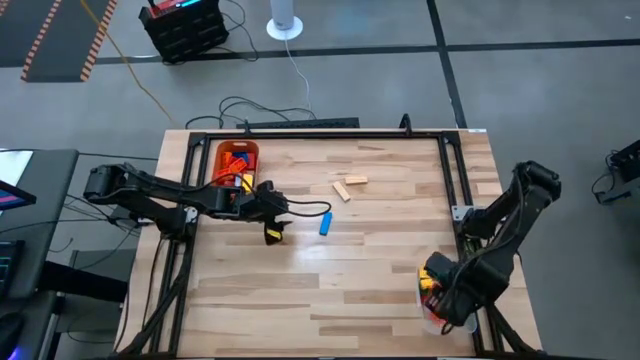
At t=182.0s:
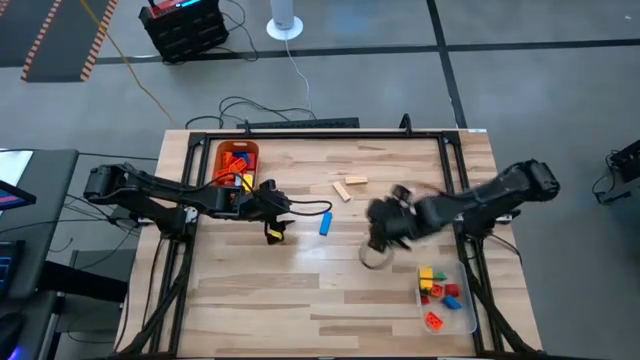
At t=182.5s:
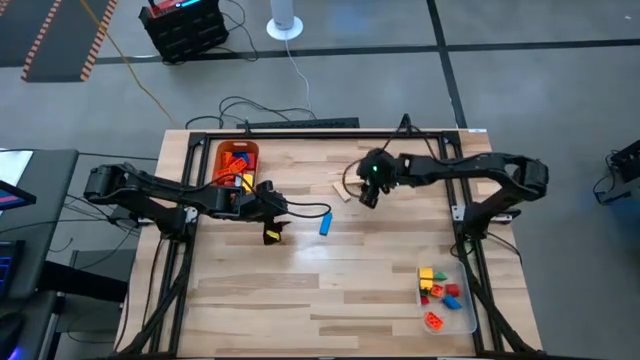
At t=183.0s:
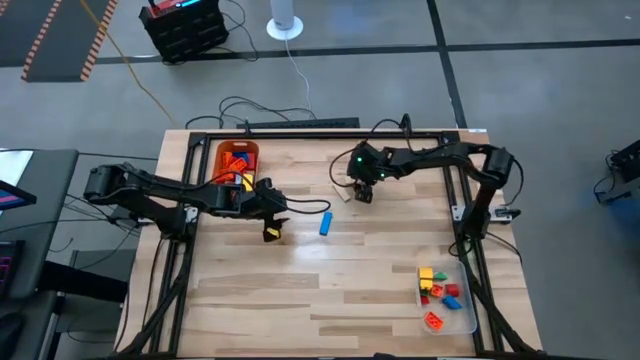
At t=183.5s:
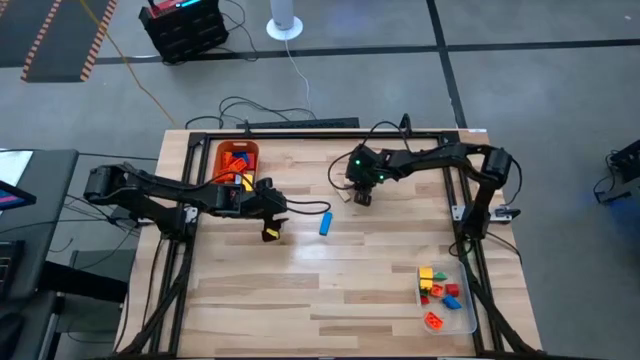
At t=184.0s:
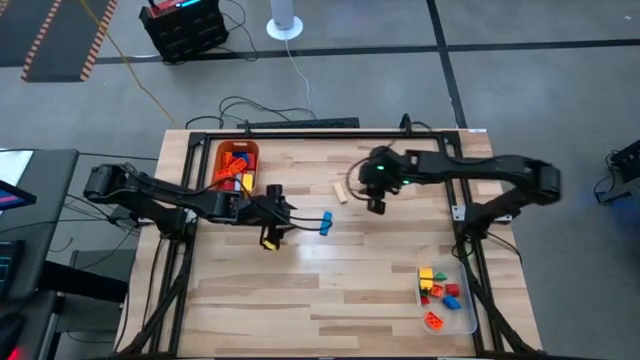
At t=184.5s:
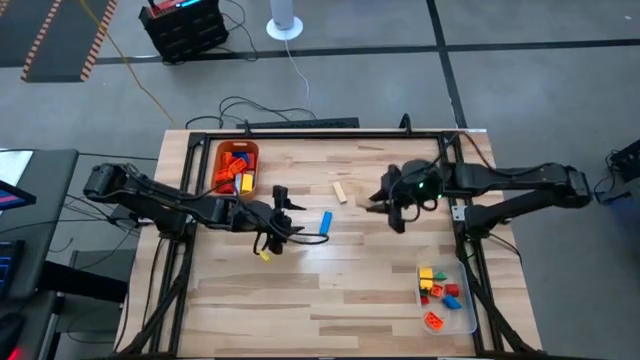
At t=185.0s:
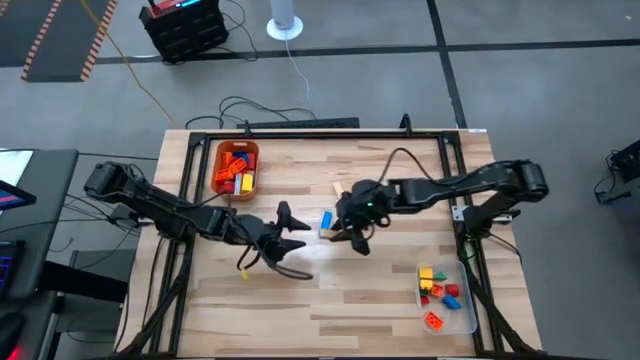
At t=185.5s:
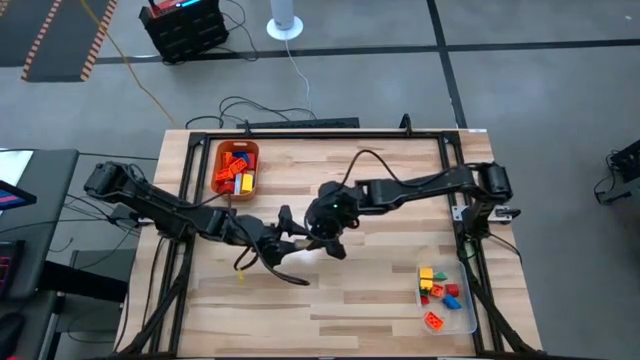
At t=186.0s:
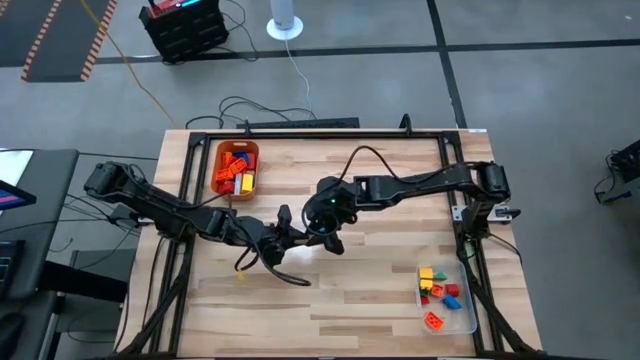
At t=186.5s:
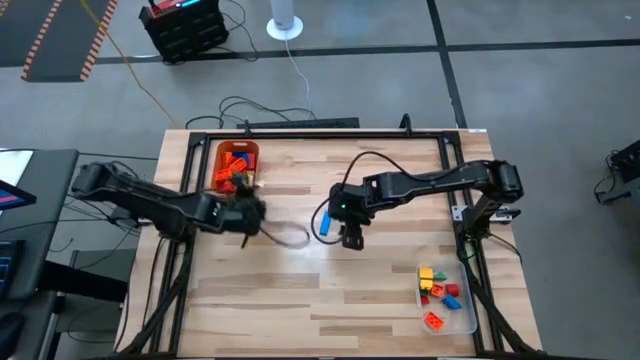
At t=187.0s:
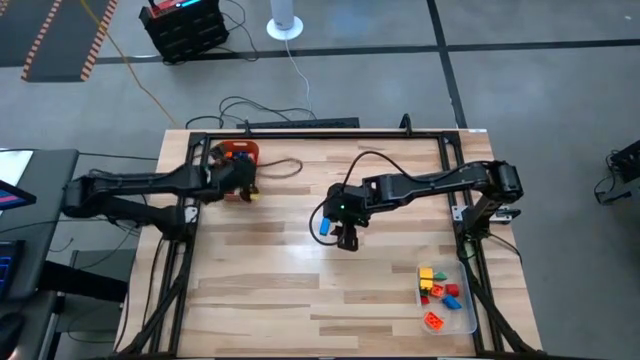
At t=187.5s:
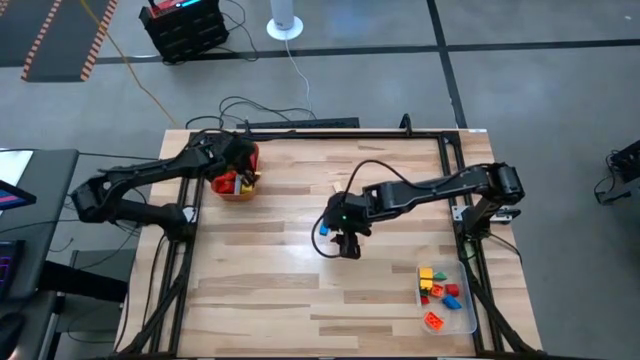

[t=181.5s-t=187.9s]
Task: Sort blocks by size
Put the large brown wooden block into the orange bin

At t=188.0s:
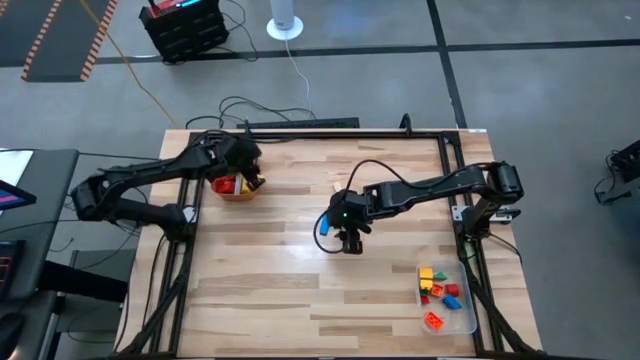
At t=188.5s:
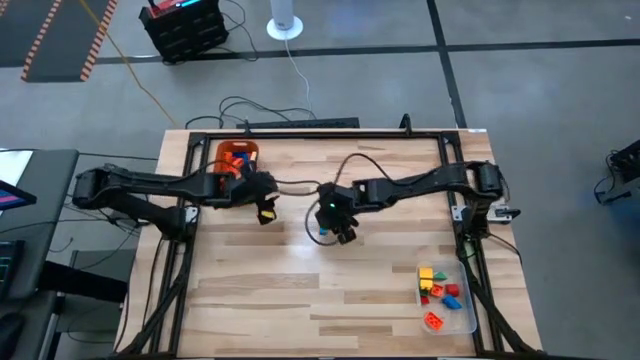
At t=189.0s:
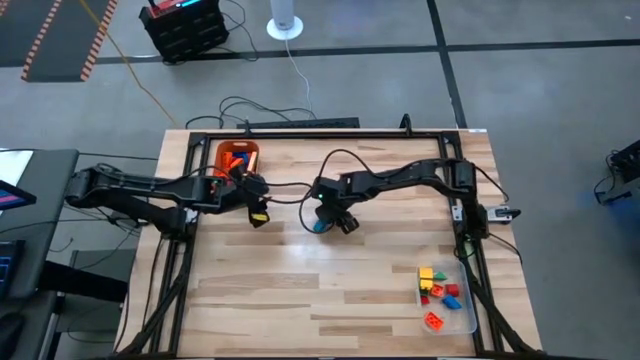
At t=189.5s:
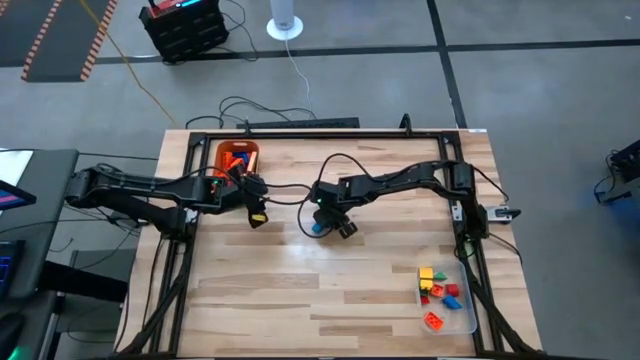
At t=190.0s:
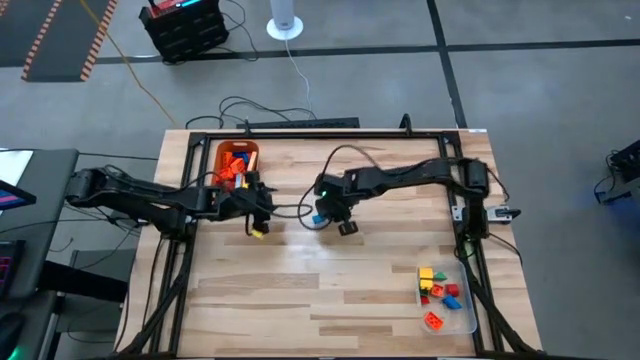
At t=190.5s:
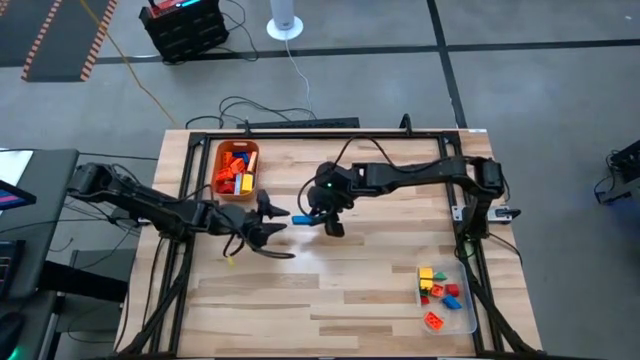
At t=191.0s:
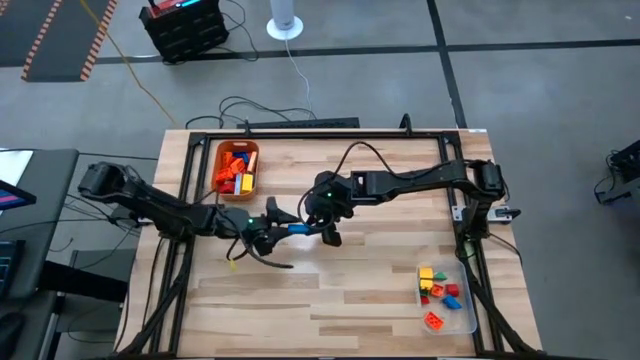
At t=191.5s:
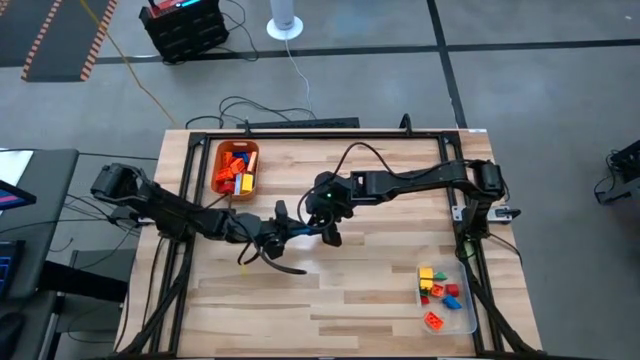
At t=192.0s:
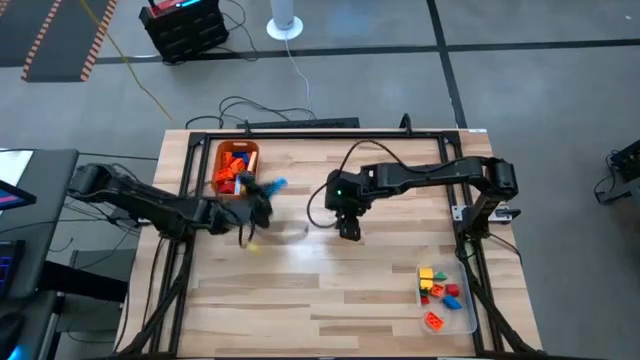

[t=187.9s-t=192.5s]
Put the large blue wooden block into the orange bin

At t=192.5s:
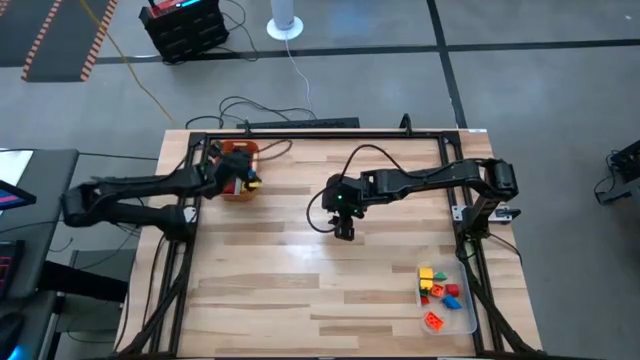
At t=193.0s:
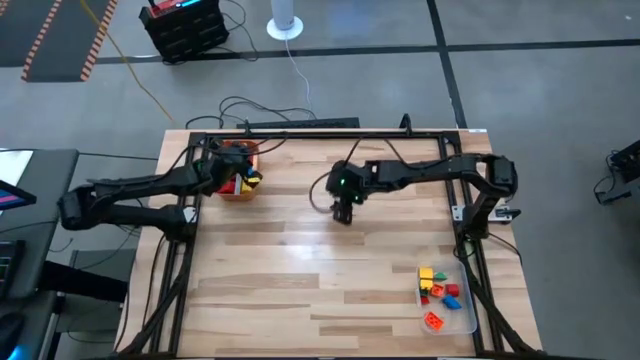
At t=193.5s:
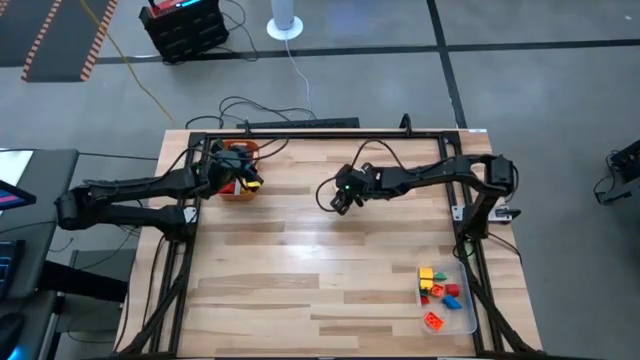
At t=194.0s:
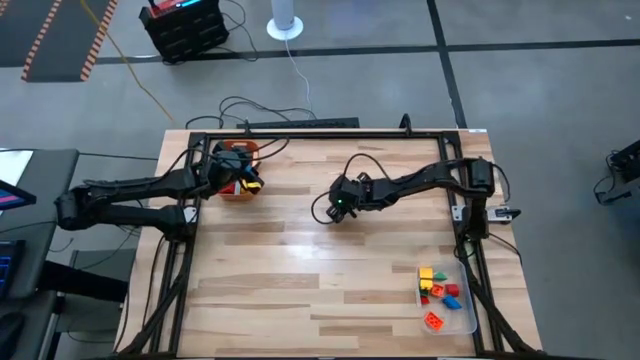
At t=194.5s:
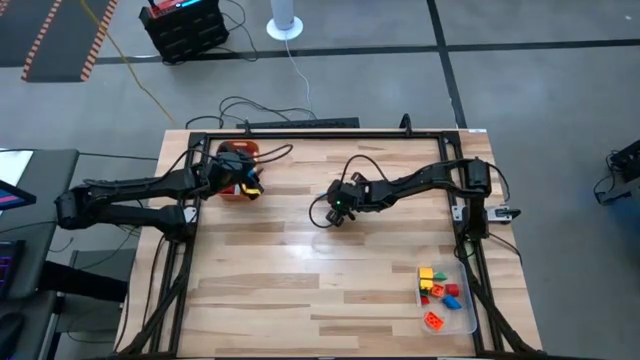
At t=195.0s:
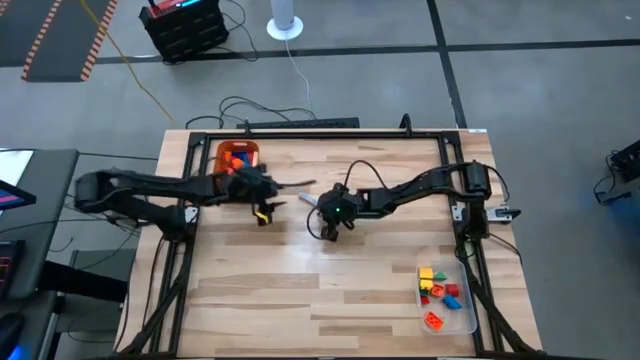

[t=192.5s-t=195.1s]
Put the large brown wooden block into the orange bin

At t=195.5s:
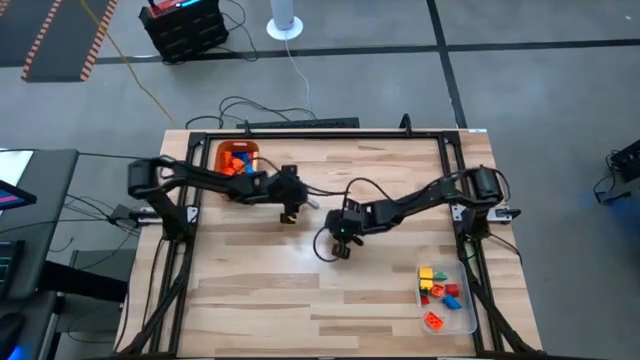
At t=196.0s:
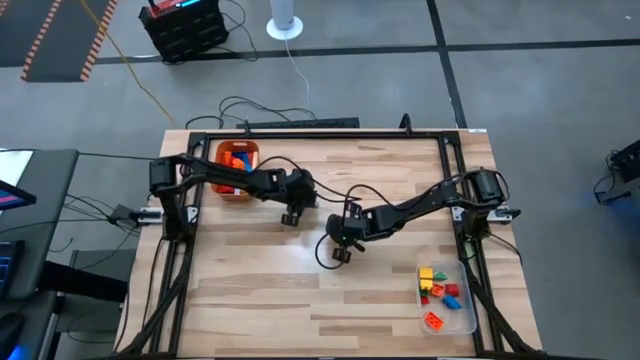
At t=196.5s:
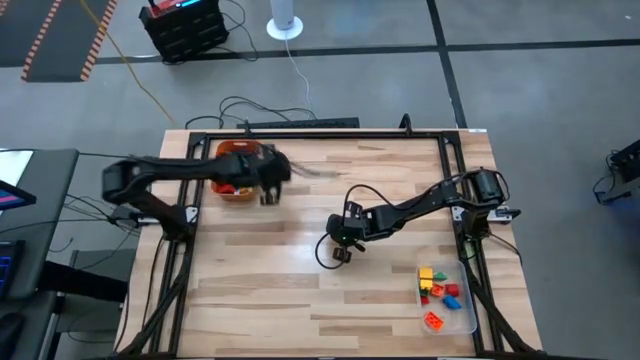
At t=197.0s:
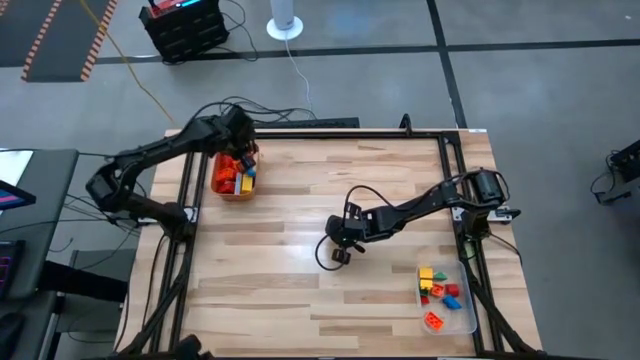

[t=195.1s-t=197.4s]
Put the large brown wooden block into the orange bin

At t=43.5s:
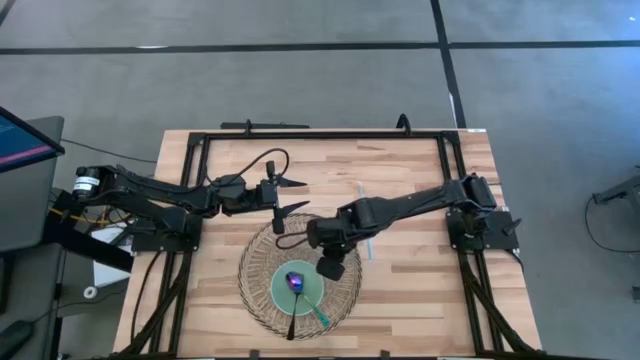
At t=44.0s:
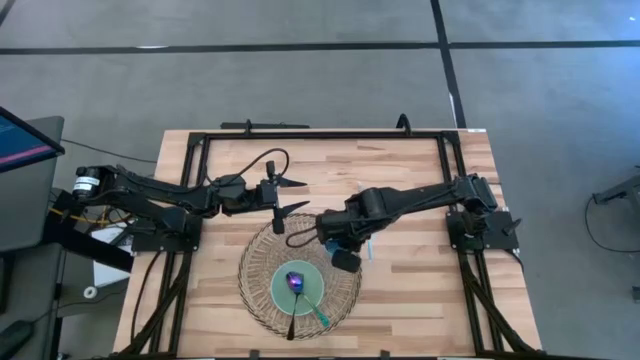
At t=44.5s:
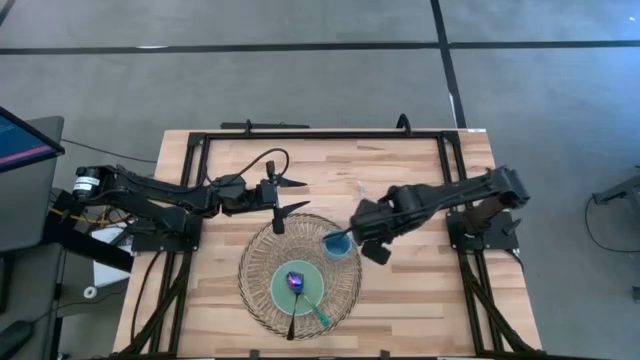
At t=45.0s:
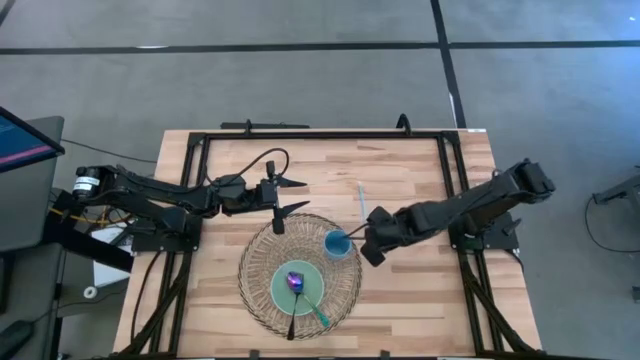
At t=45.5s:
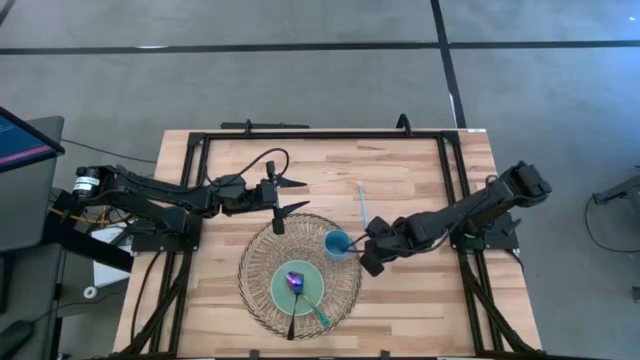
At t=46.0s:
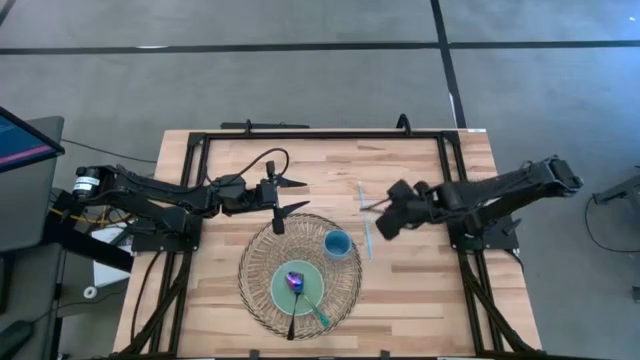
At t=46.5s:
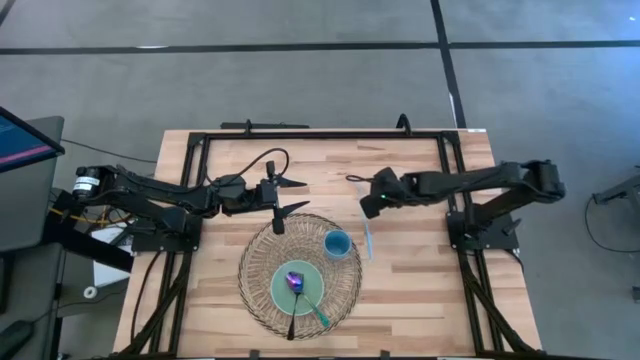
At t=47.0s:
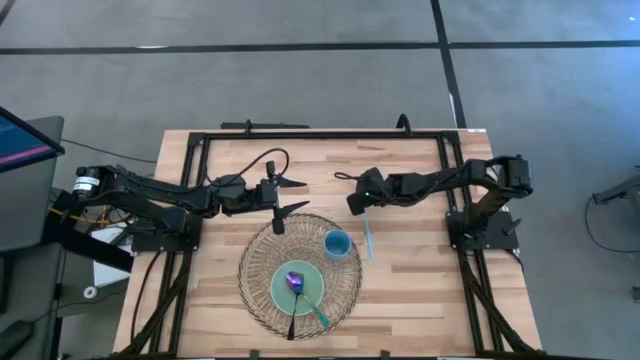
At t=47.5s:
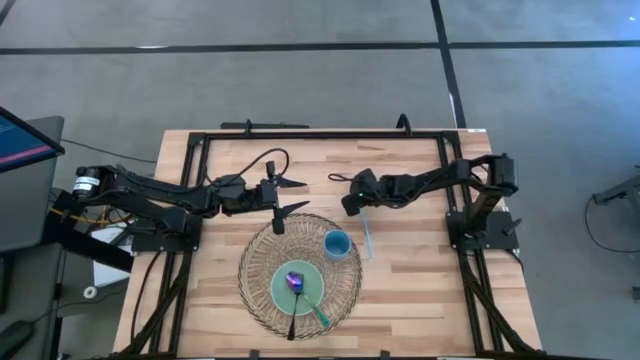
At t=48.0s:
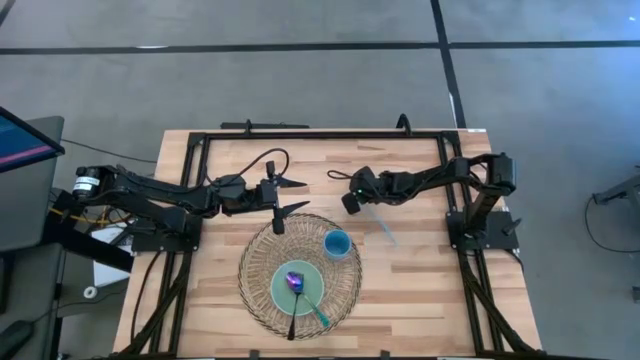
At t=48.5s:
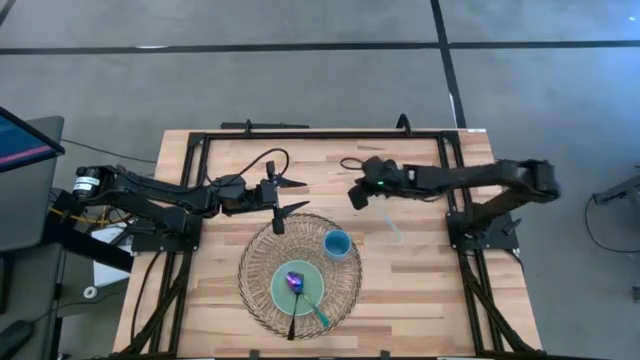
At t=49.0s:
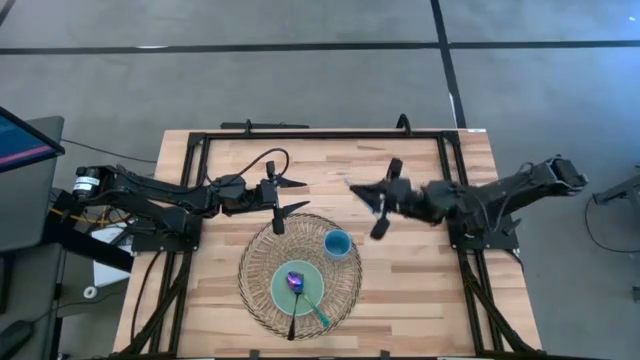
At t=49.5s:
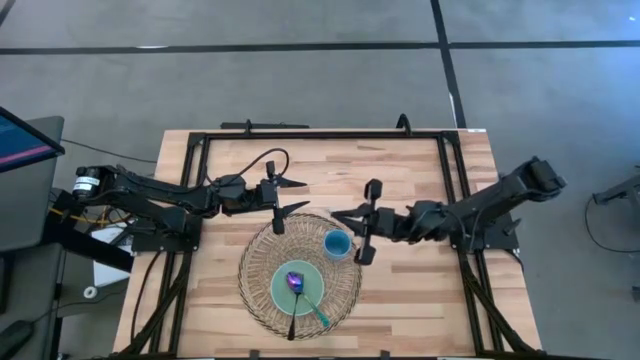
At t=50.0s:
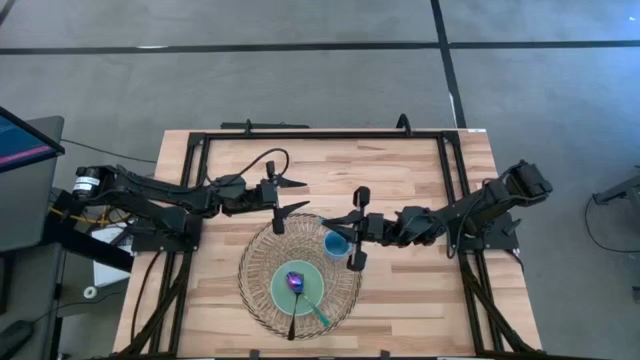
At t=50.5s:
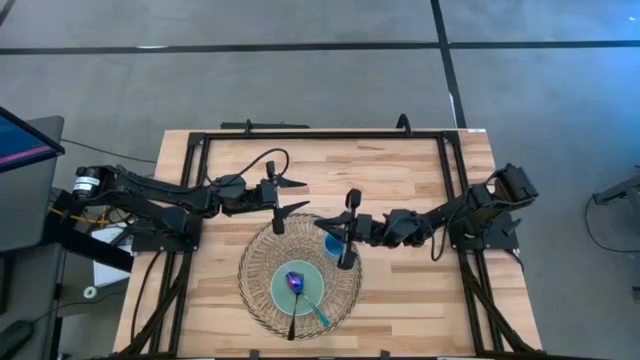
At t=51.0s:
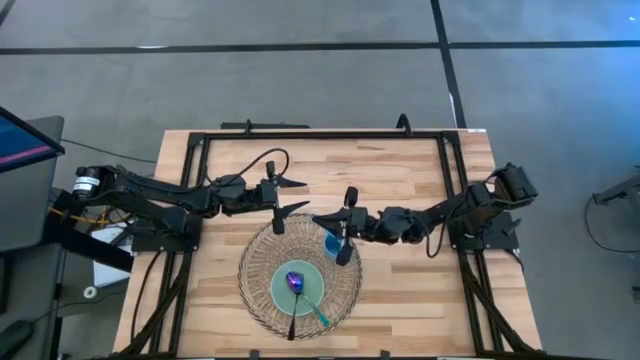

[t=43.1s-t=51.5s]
Task: Pick & Place Utensil
Put the blue straw into the blue cup to the top right of the green bowl
